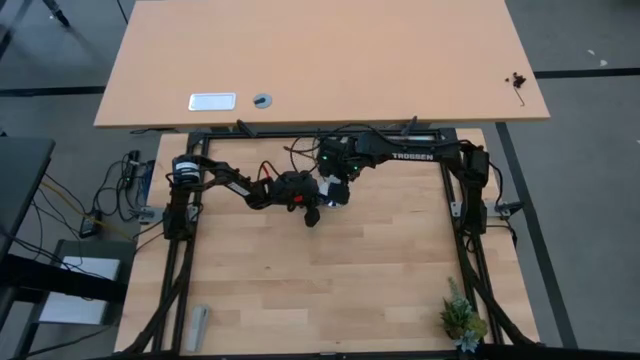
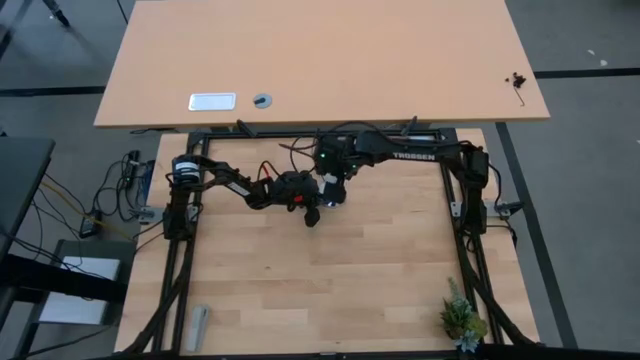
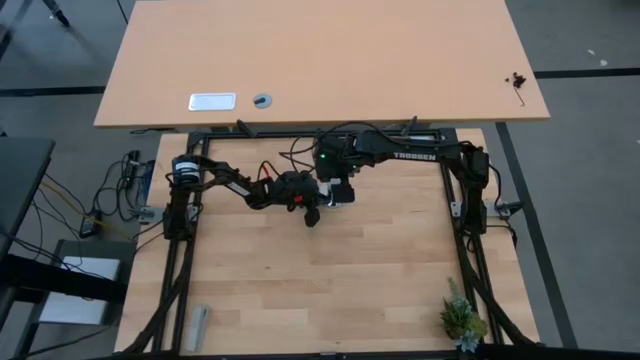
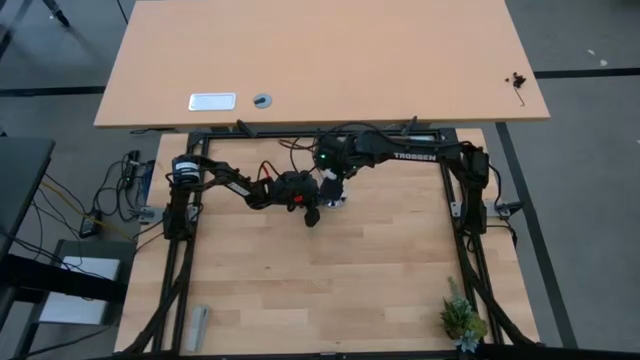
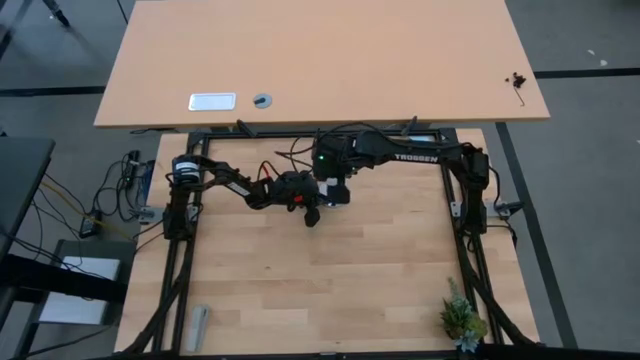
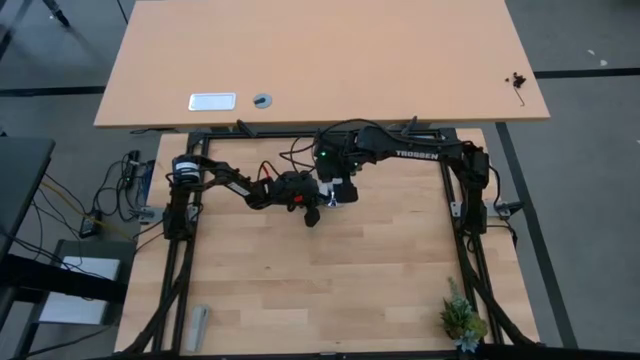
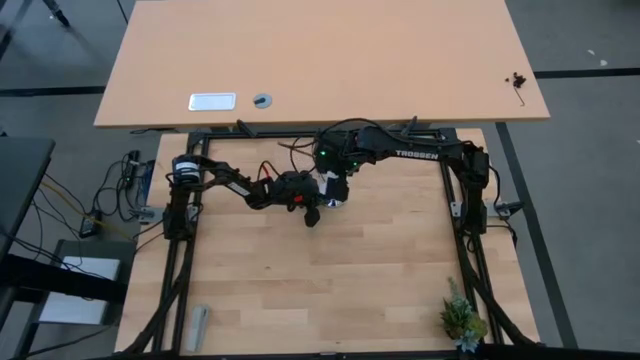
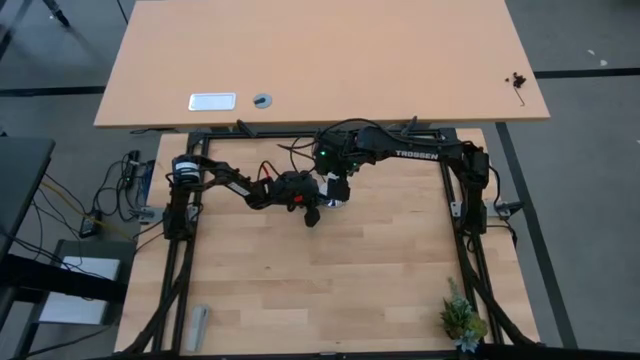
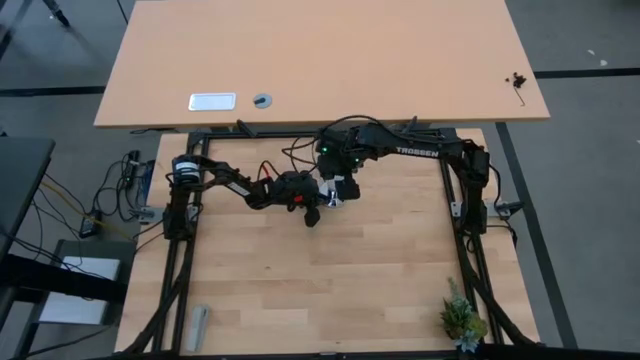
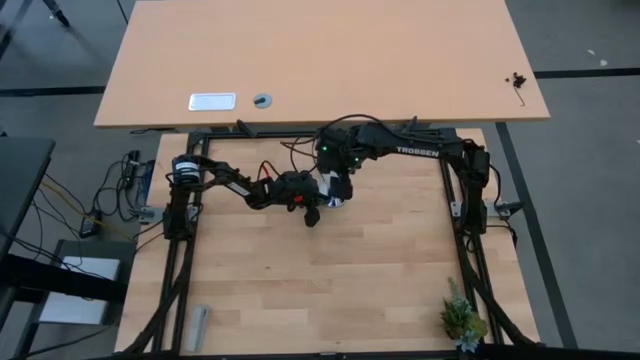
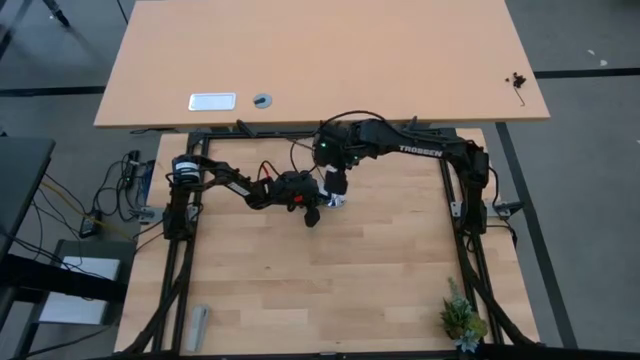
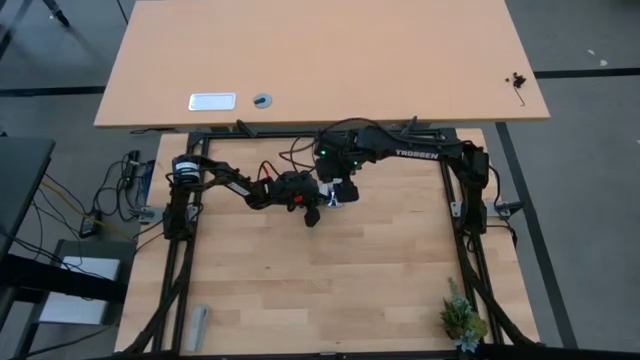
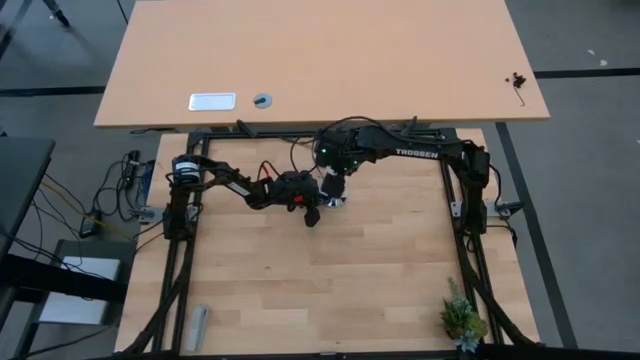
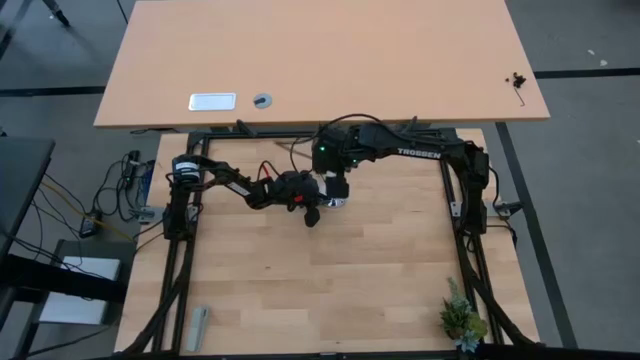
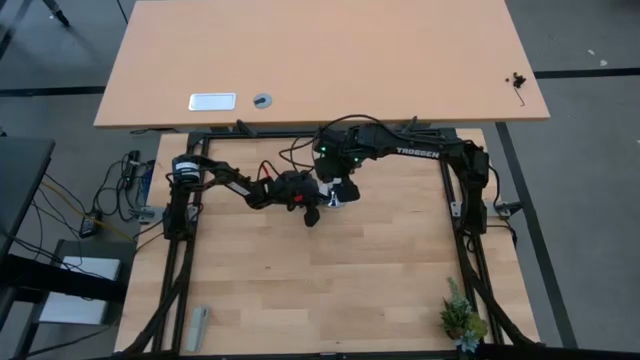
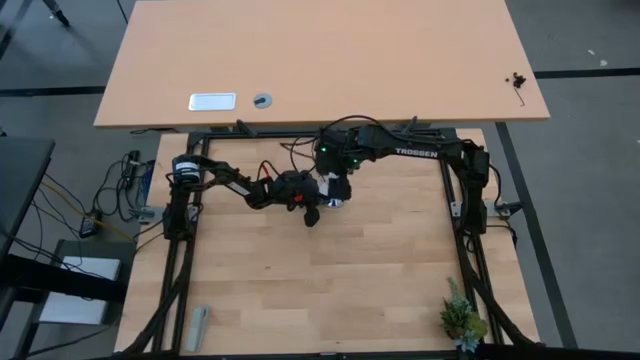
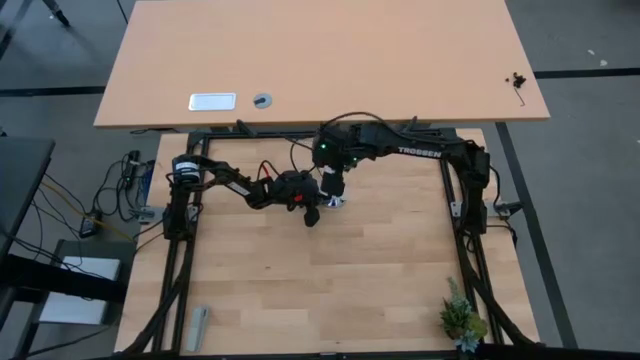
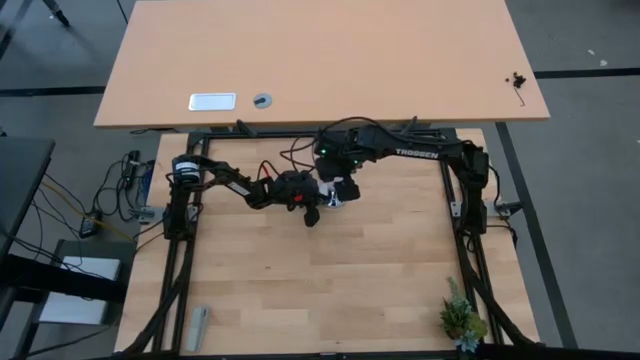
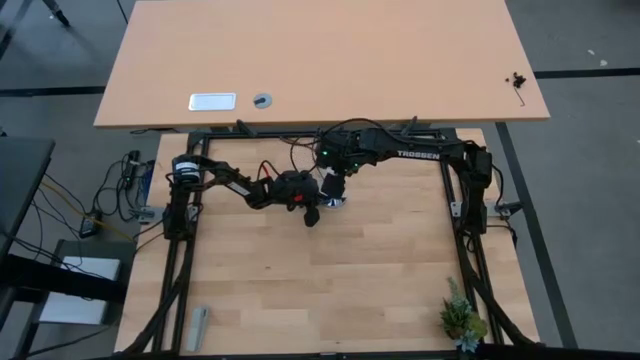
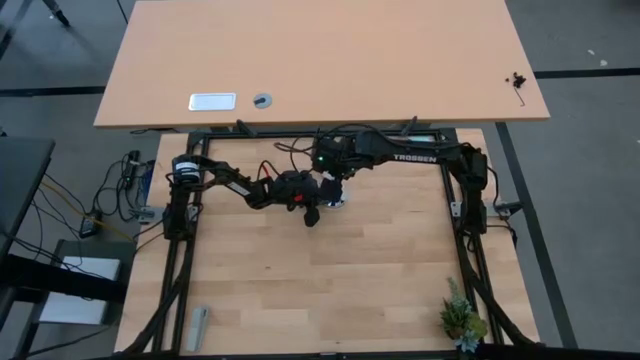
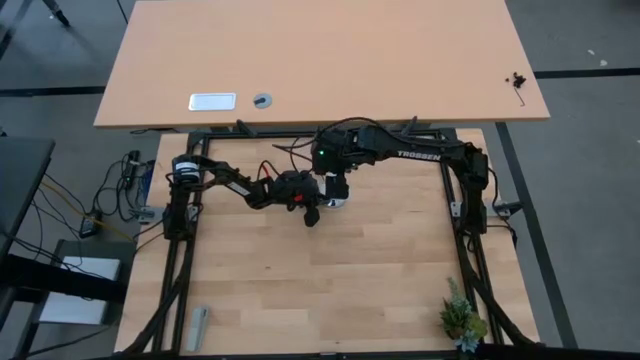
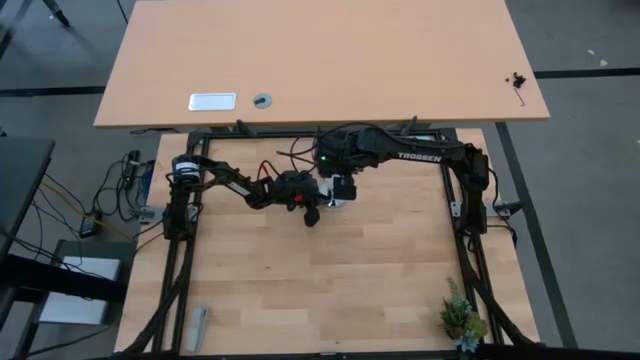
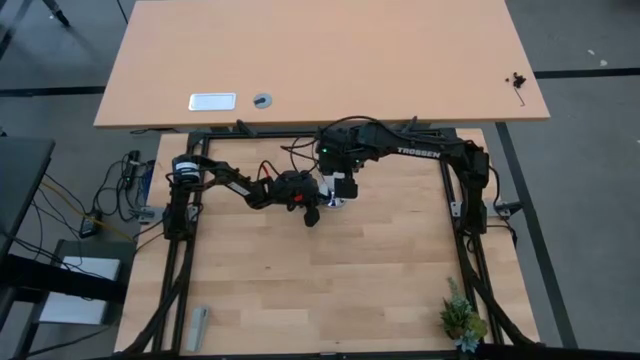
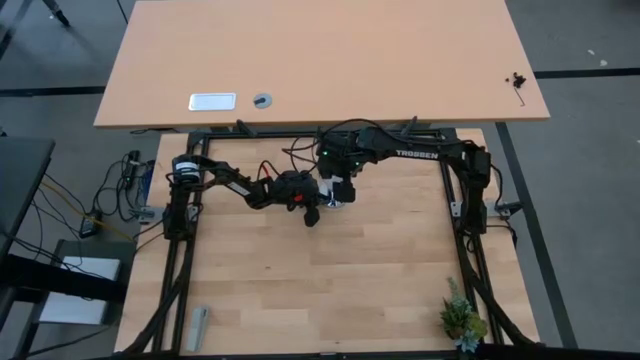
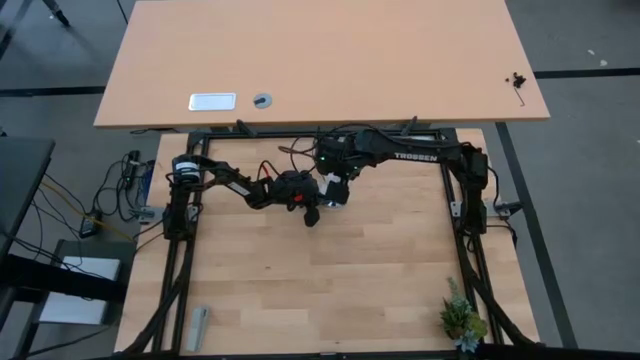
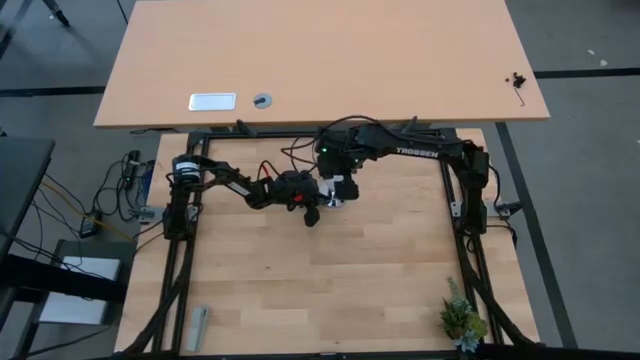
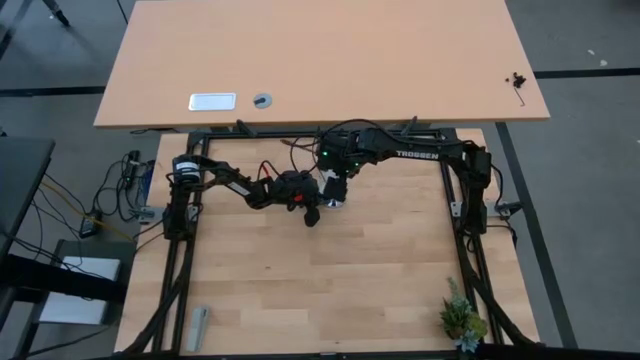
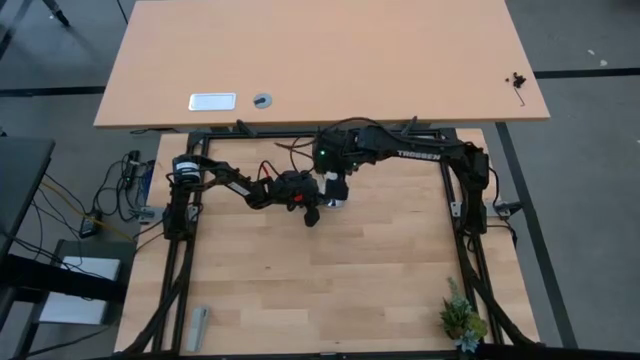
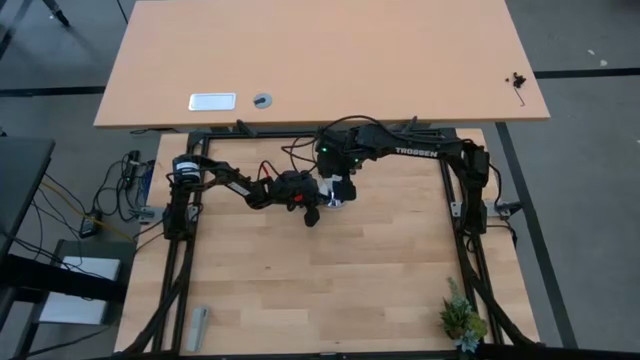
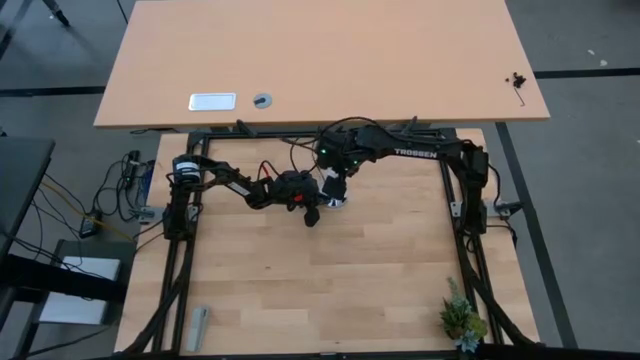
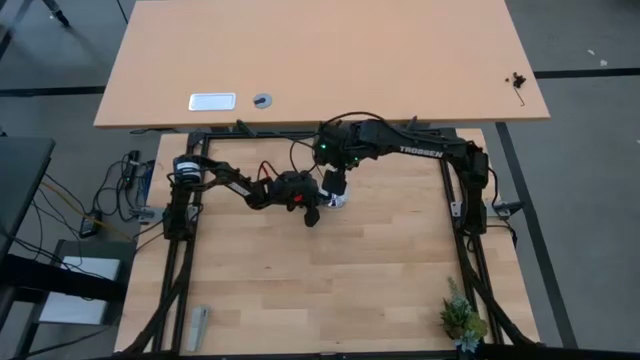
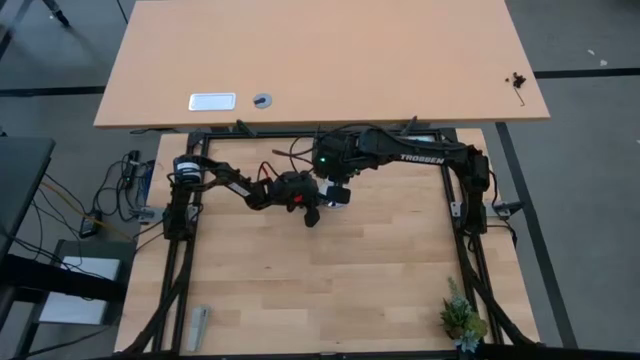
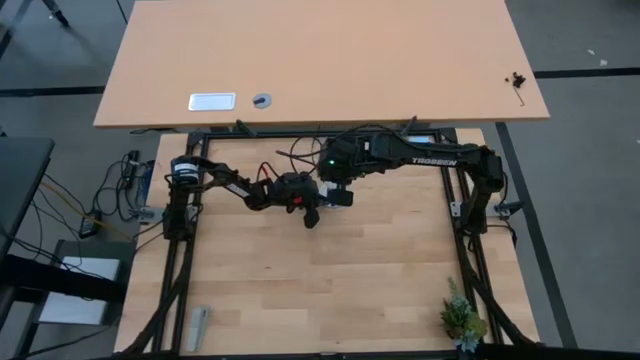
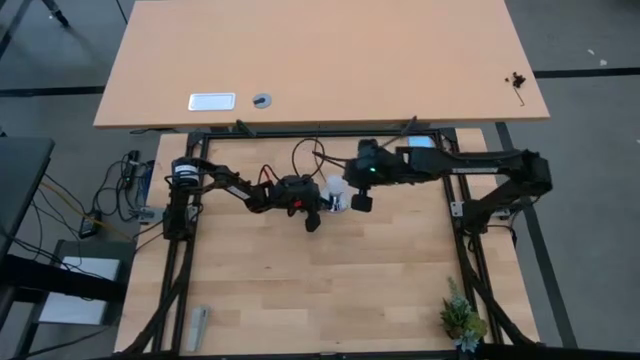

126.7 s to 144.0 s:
Task: Screw lightbulb
Insert the lightbulb into the lamp

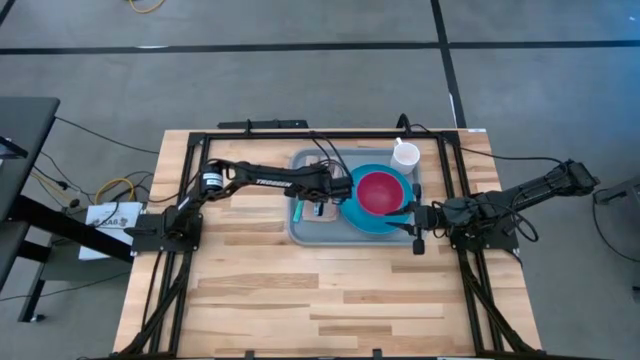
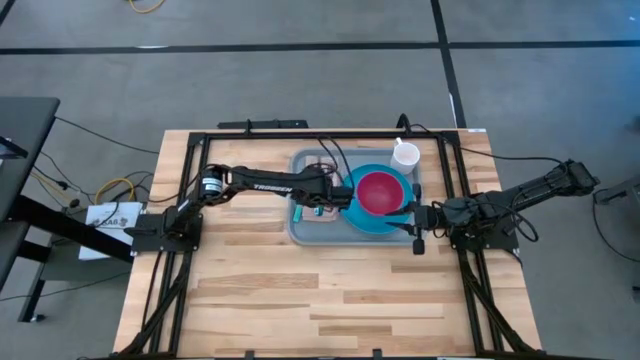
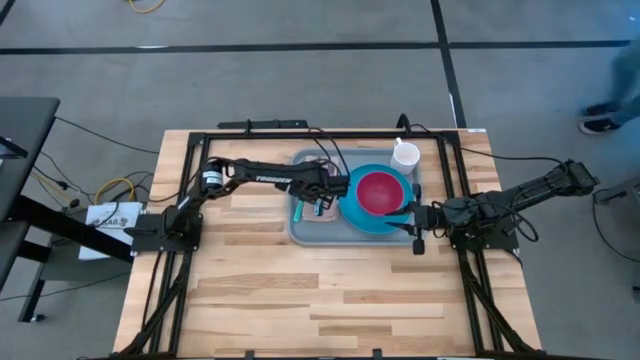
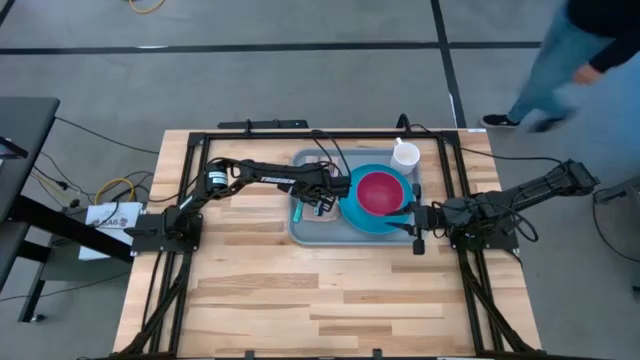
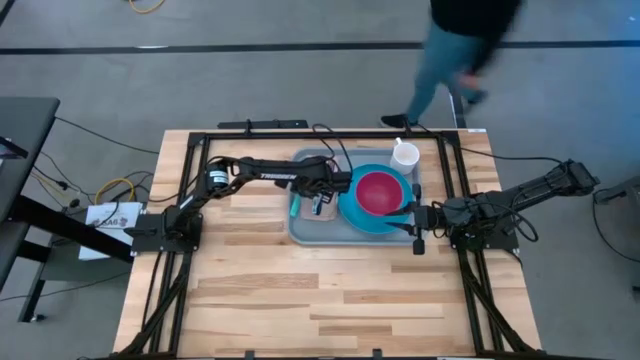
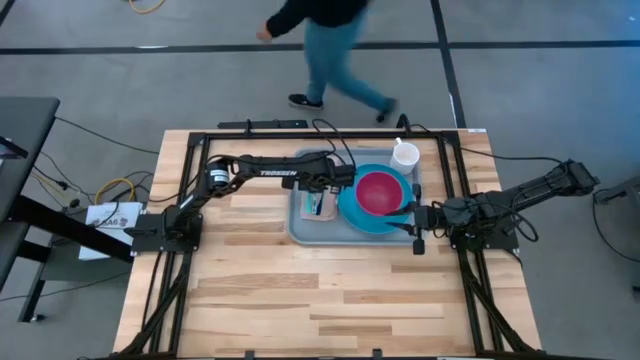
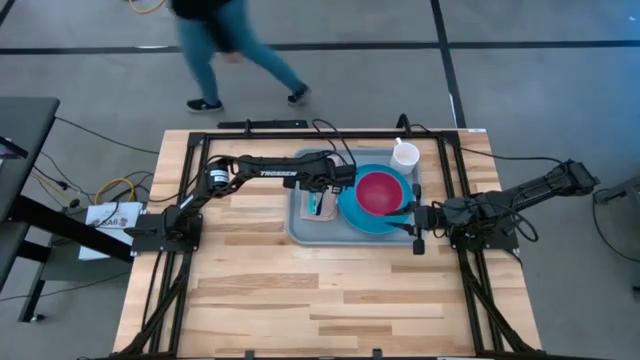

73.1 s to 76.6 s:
Task: Set up tray
Adjust the green spoon on top of the light brown table napkin on the black serving tray
